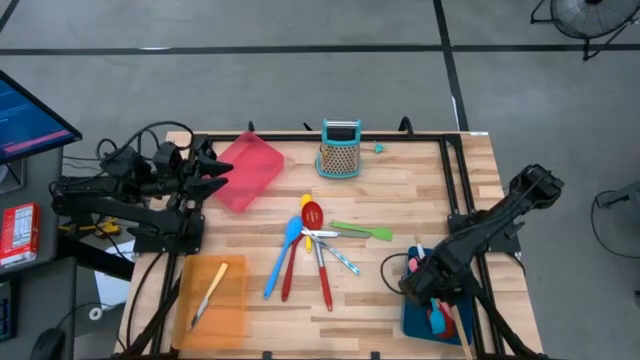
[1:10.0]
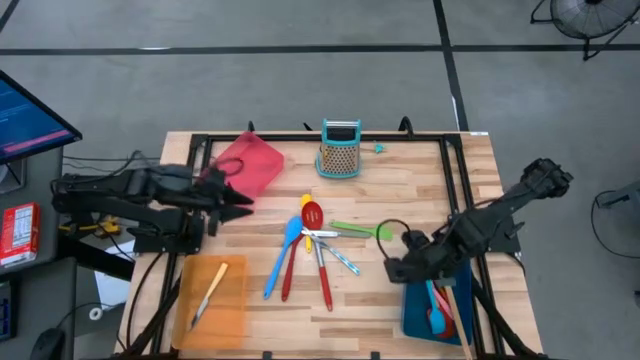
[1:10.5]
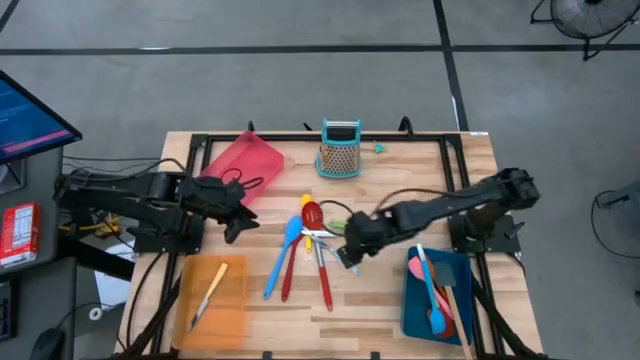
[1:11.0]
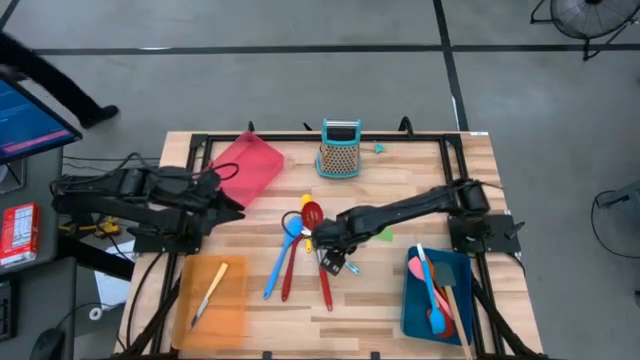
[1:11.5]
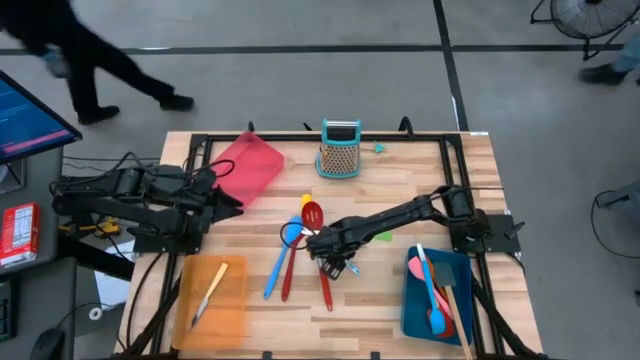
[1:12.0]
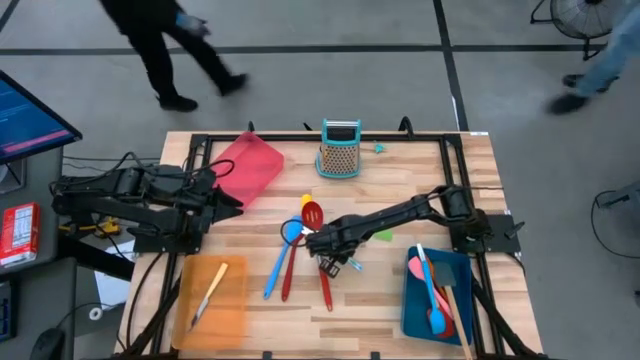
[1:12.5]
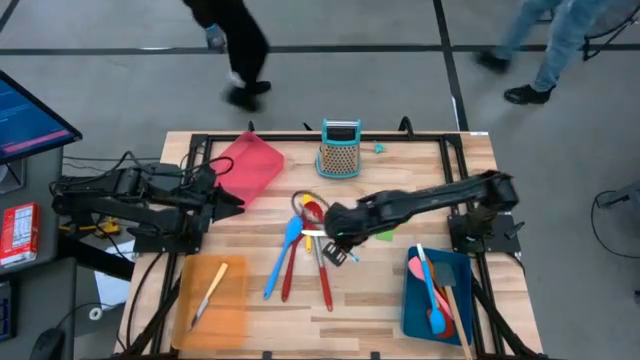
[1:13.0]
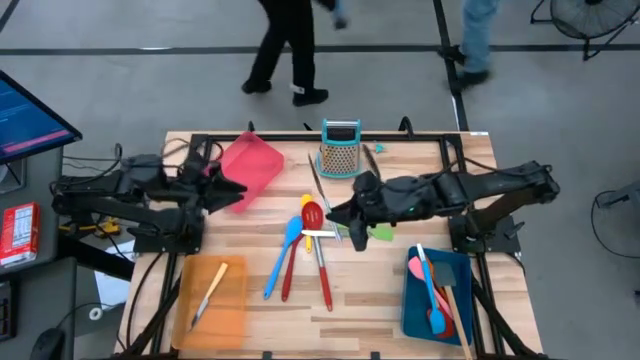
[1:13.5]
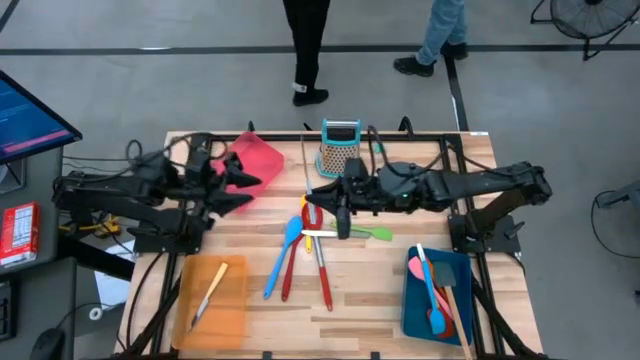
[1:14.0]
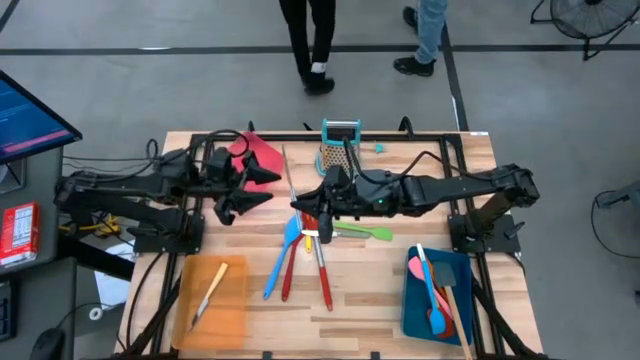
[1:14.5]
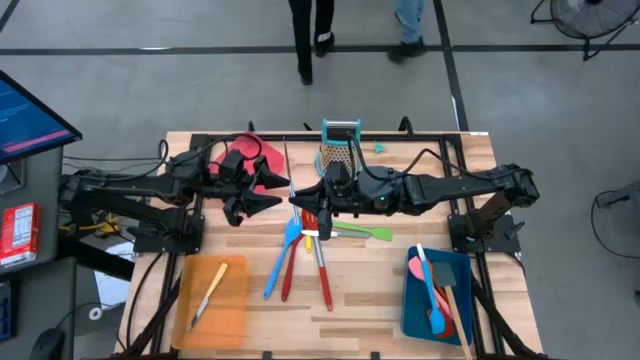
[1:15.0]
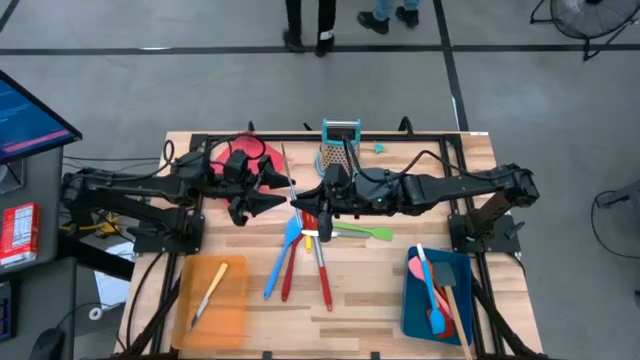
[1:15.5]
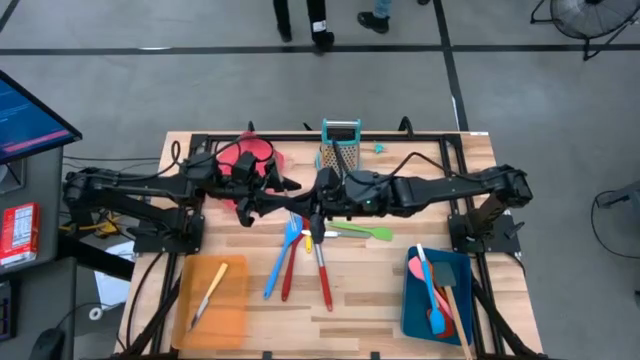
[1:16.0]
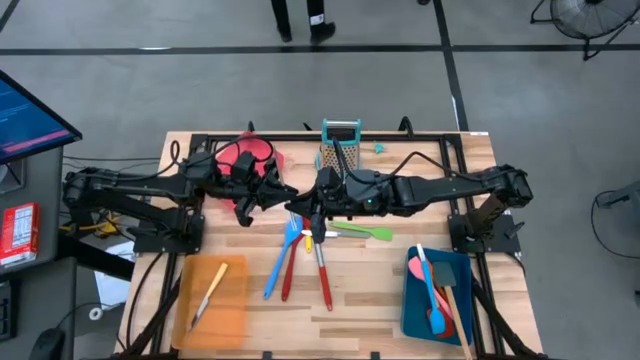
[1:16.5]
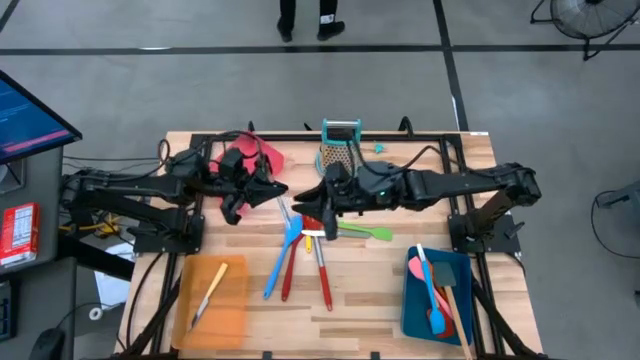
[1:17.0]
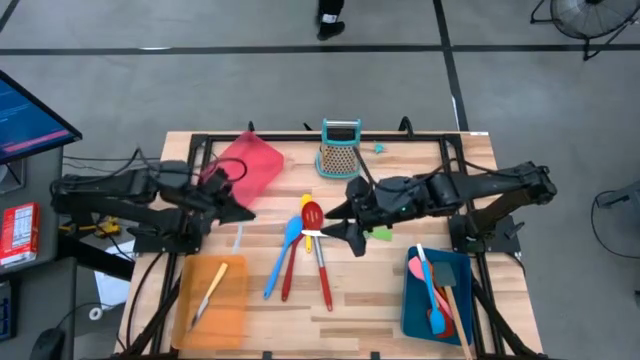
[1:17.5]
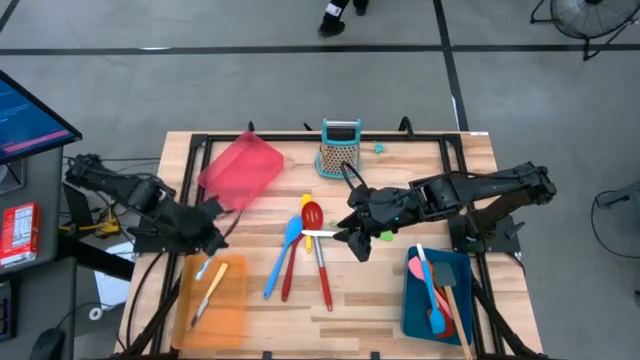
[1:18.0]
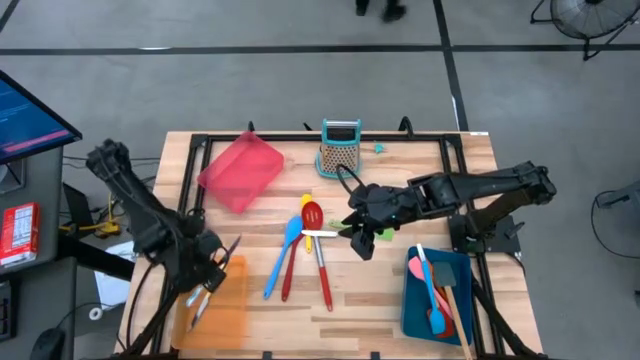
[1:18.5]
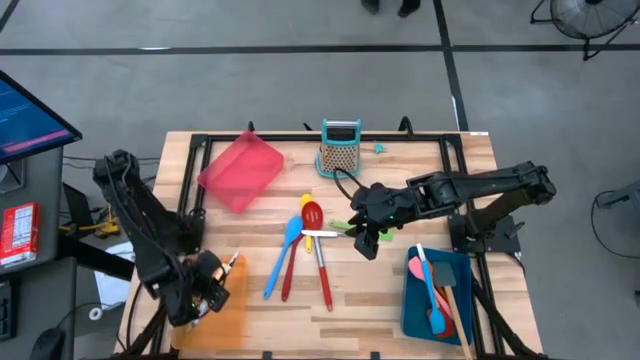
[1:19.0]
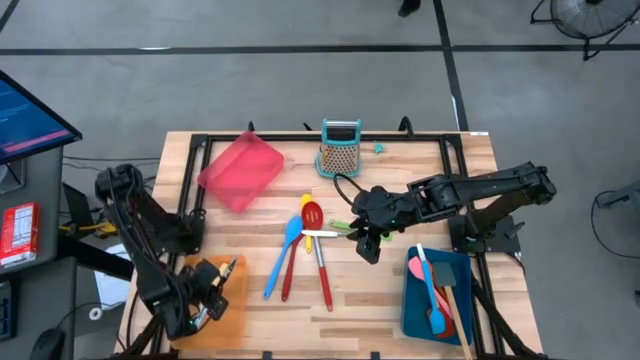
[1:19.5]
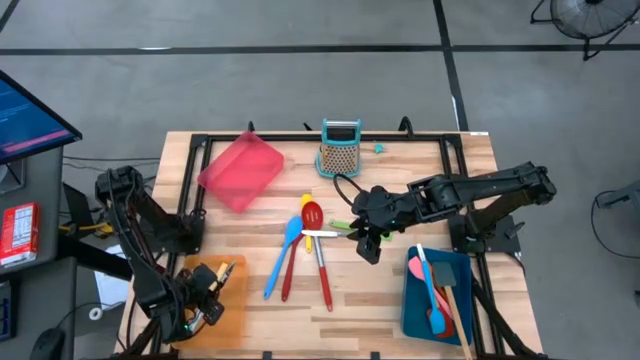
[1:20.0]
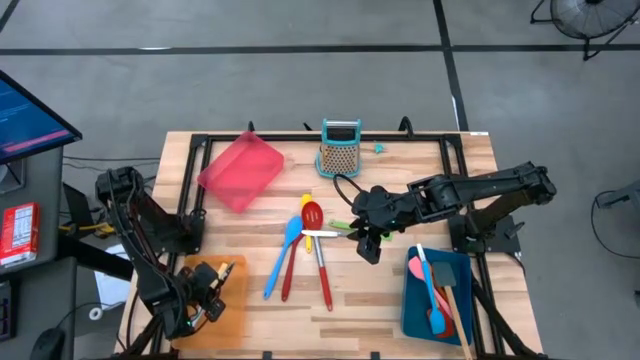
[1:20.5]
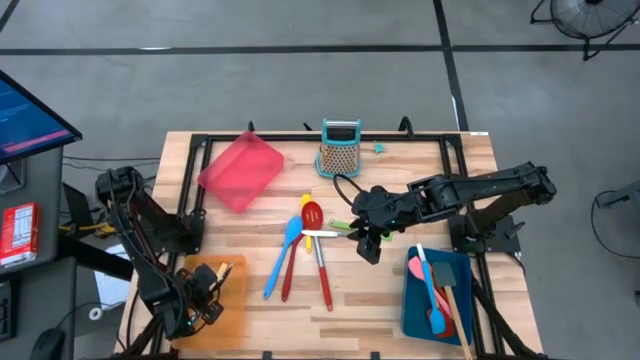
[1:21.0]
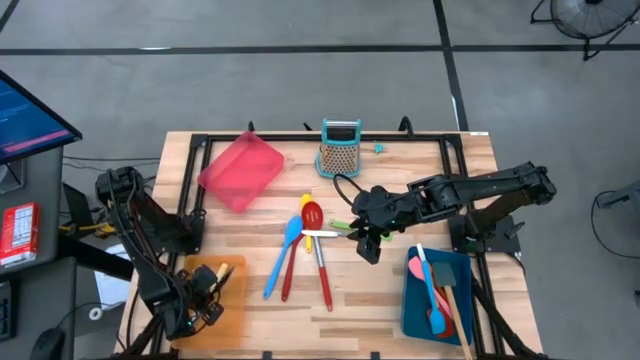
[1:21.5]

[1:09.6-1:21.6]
Task: Pick & Place Kitchen Items
Put the blue table knife into the orange bin

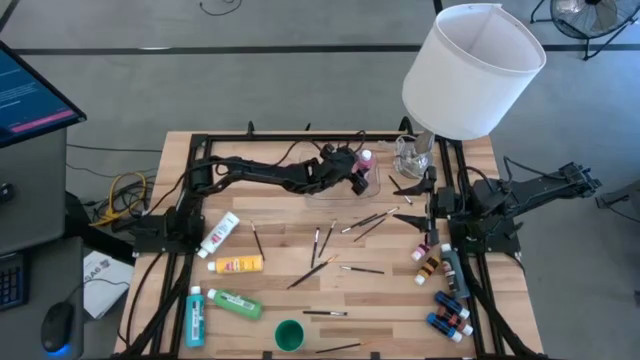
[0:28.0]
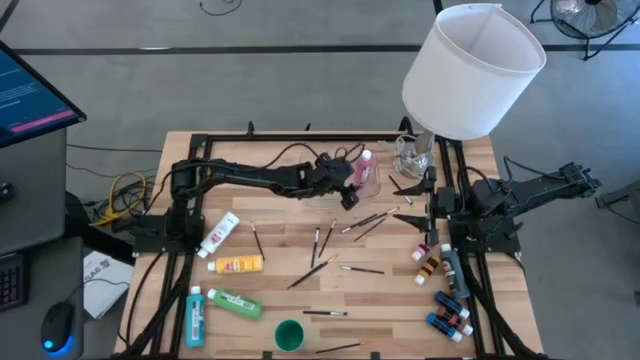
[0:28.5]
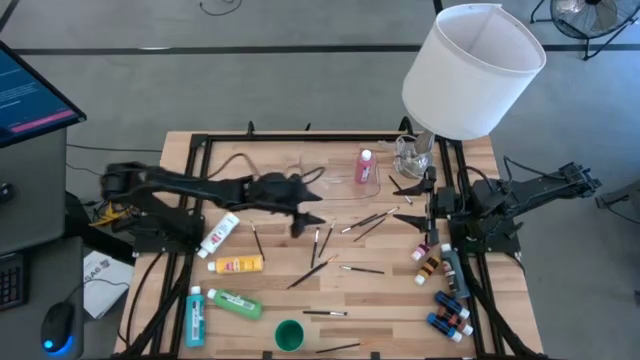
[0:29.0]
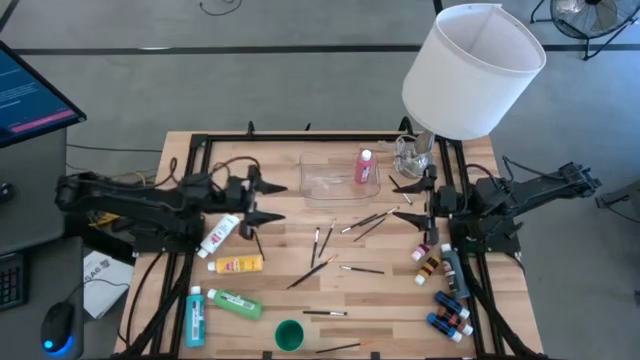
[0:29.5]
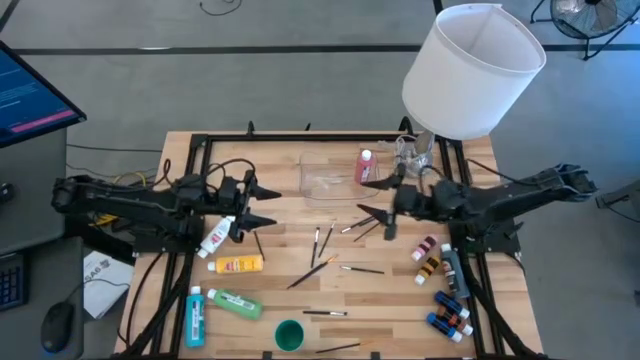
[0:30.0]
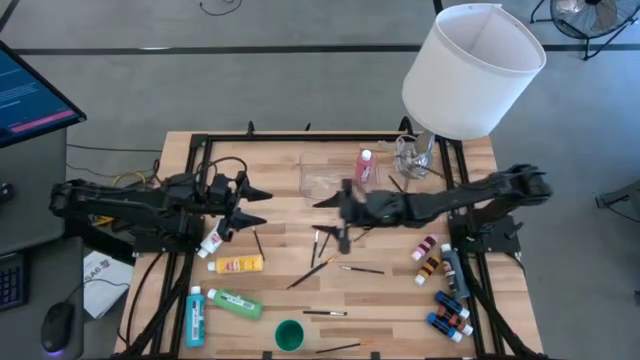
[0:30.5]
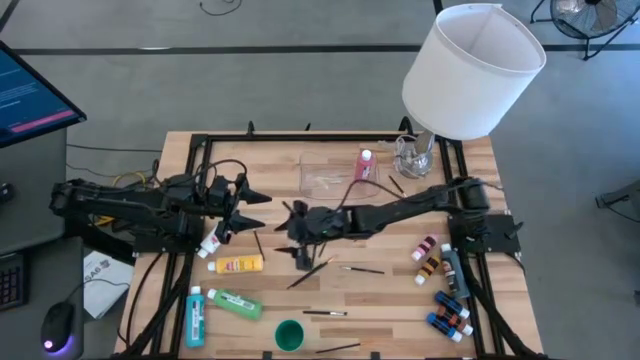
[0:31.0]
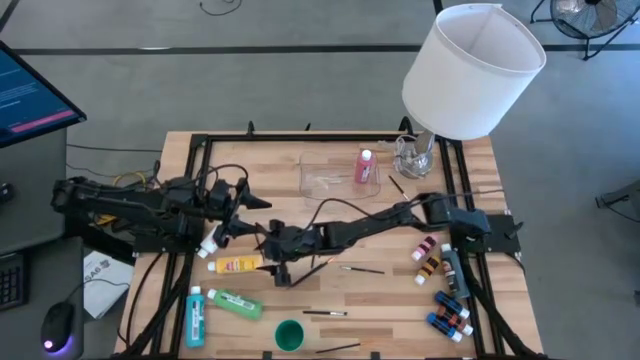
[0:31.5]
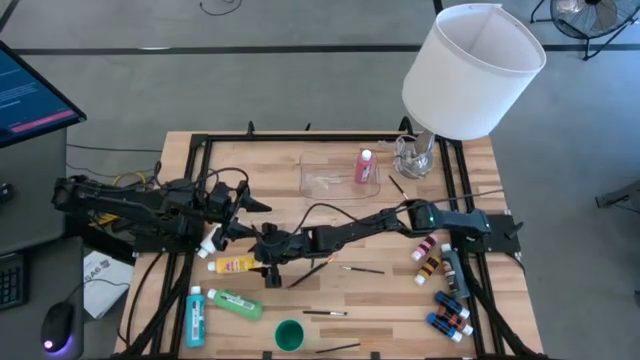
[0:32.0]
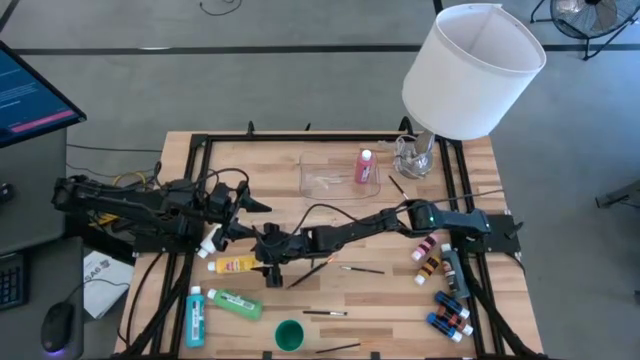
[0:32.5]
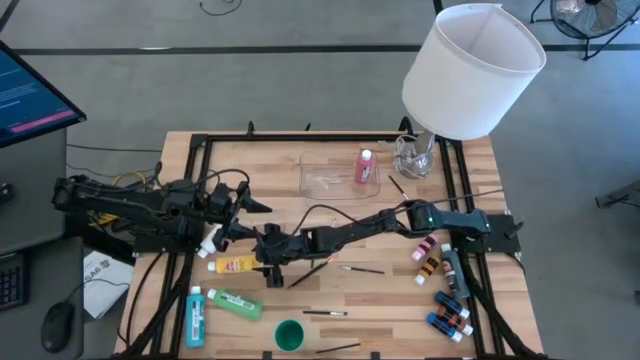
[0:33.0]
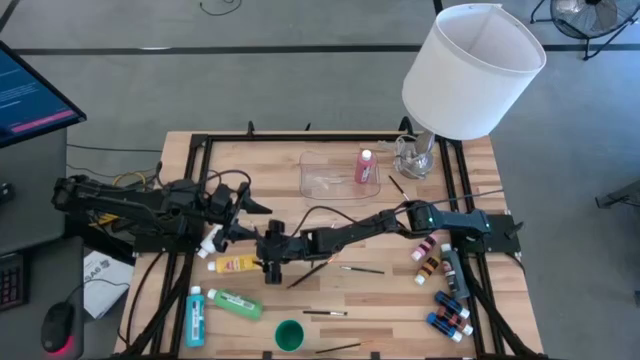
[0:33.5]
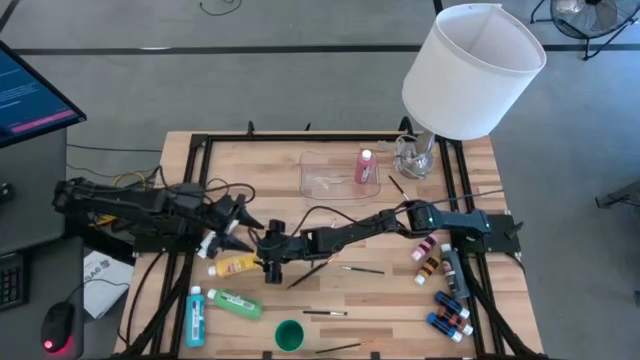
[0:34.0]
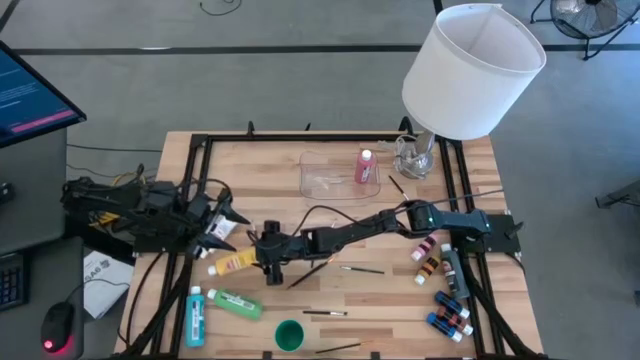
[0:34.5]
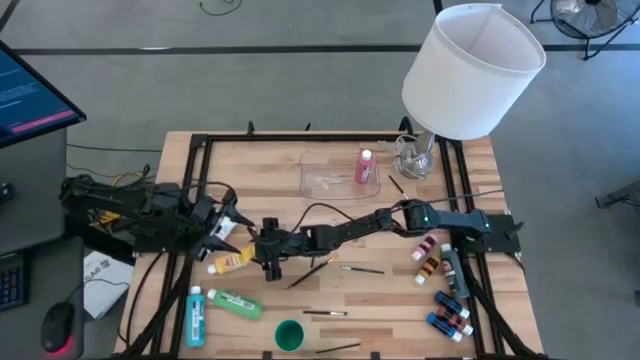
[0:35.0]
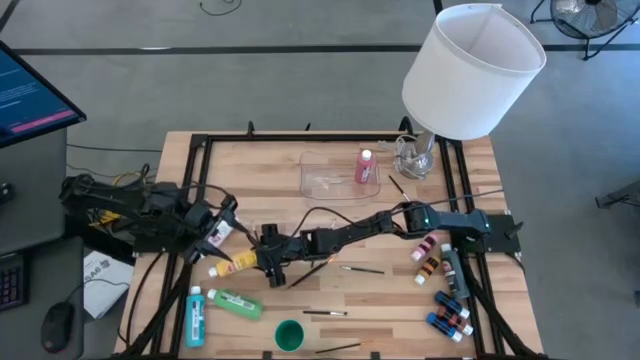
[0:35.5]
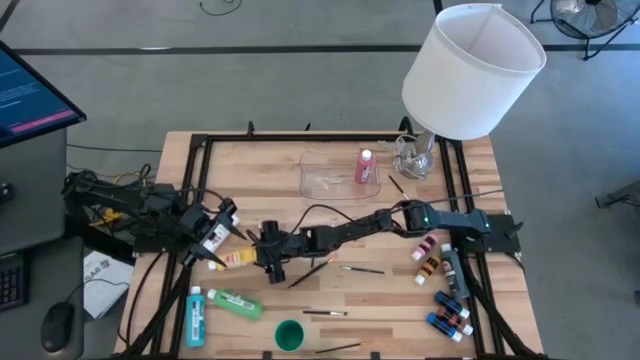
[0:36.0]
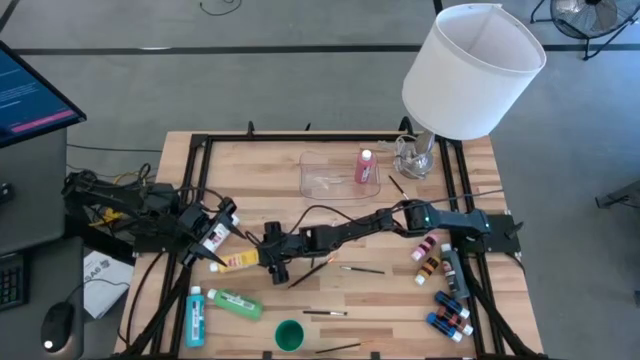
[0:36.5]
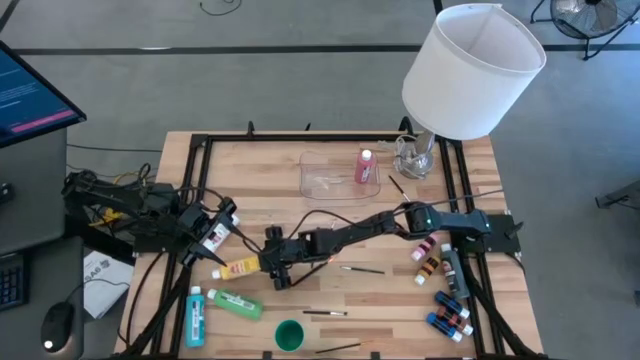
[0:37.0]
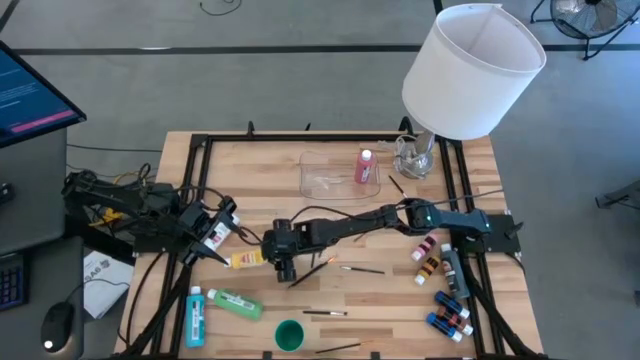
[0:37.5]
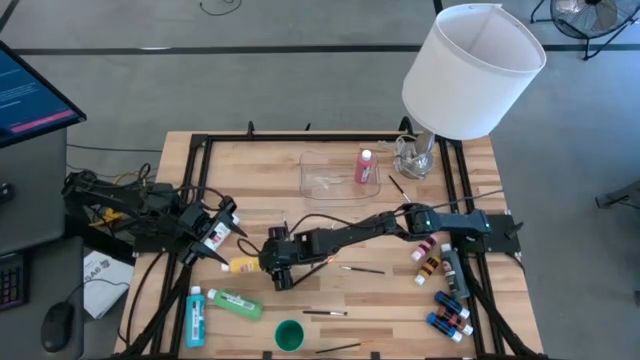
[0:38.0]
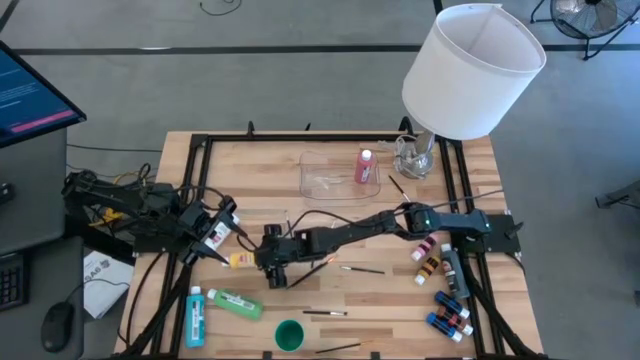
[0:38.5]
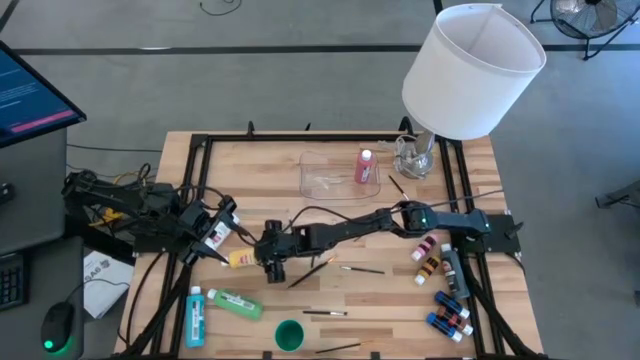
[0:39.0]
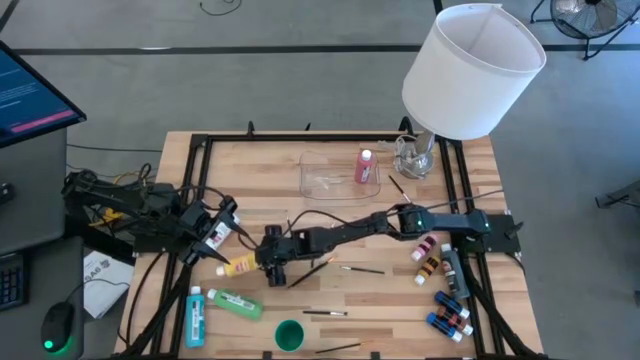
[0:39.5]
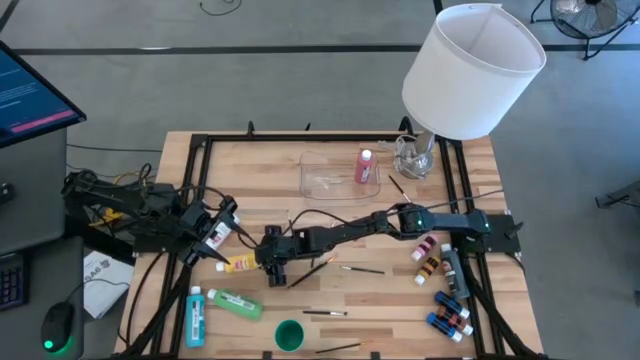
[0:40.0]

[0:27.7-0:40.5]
Task: Pick & Place Paint Supplies
Put the big yellow paint bottle into the transparent bin
